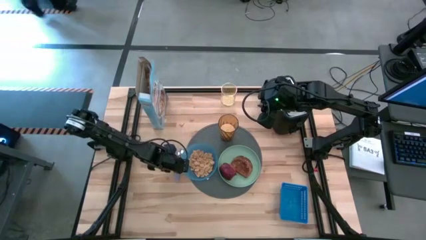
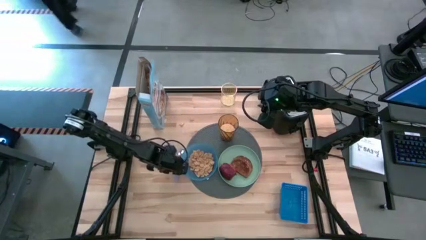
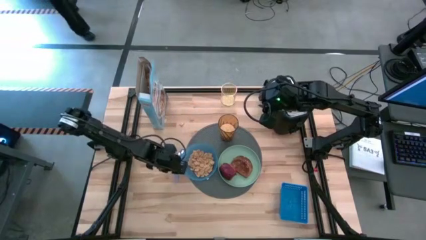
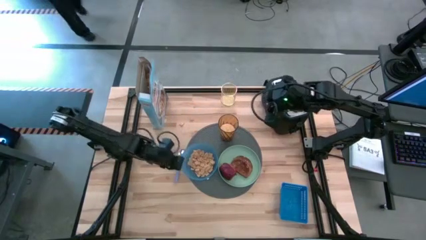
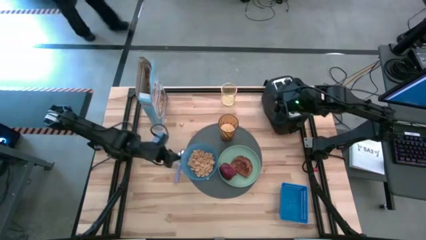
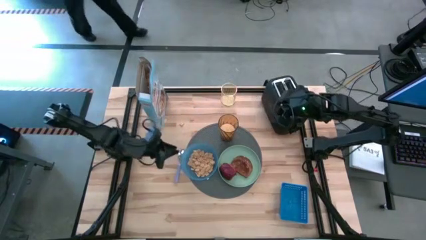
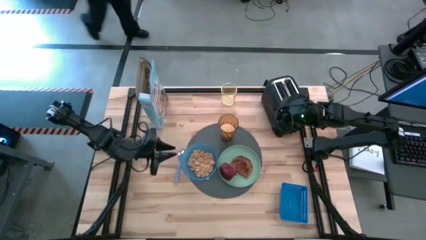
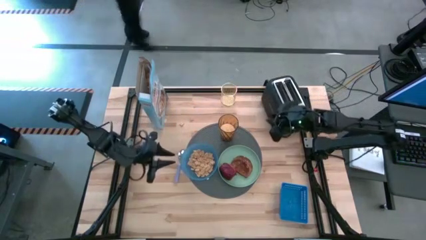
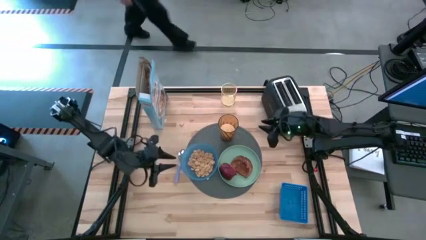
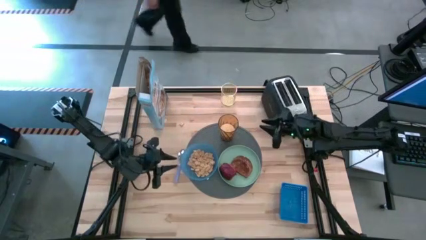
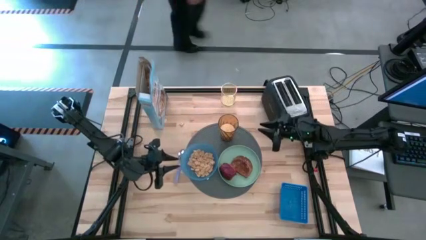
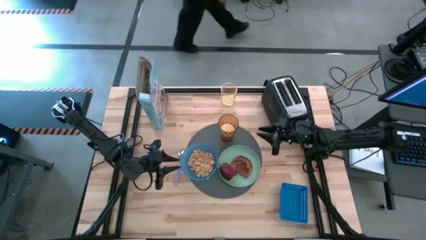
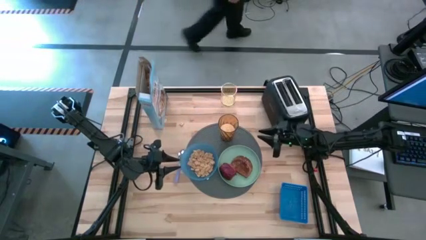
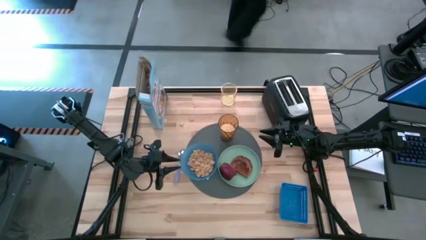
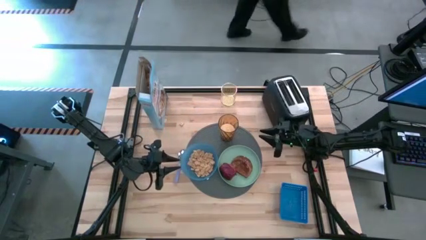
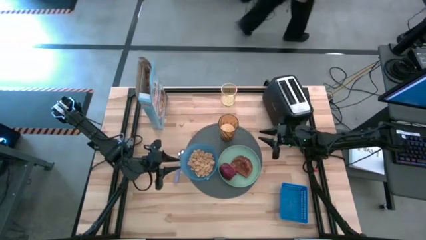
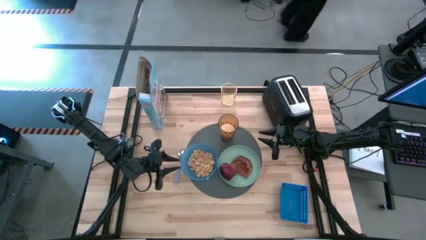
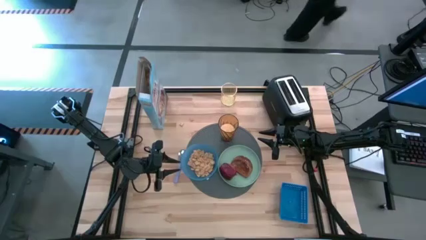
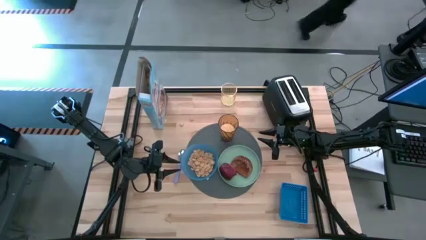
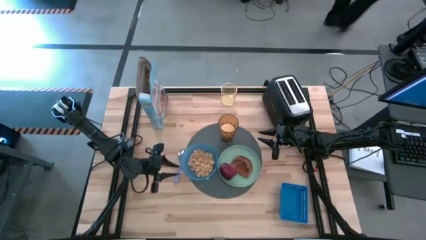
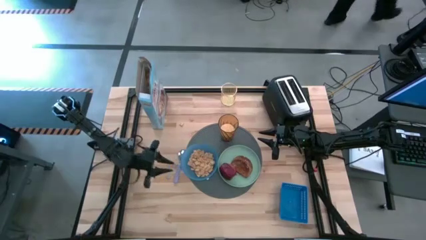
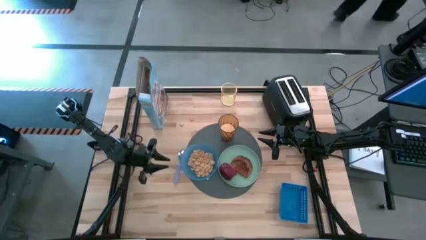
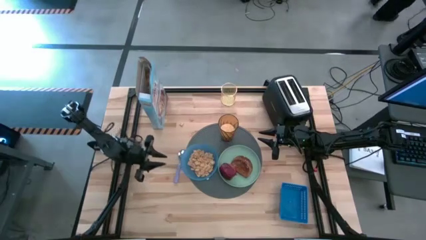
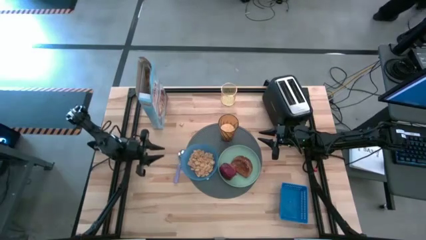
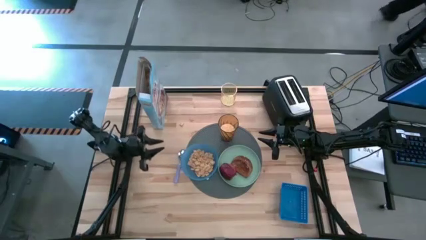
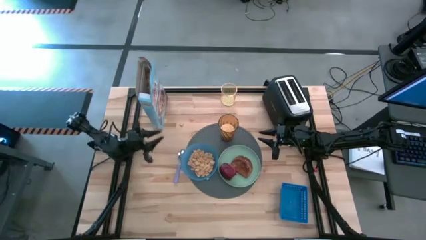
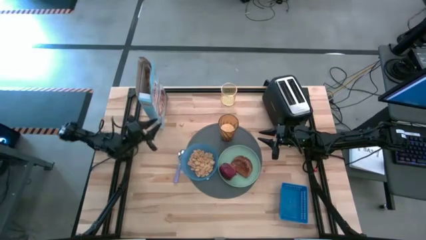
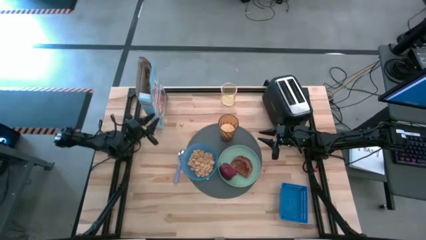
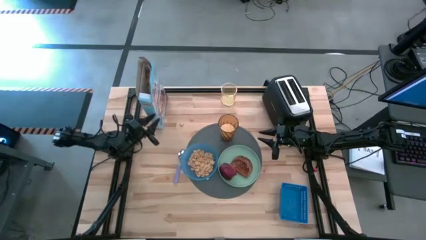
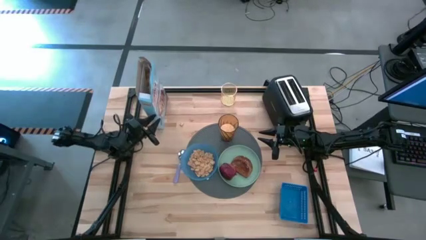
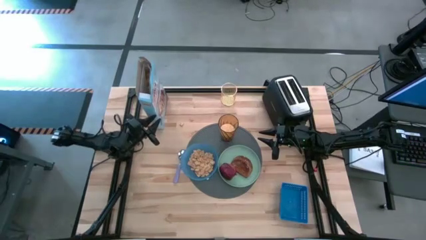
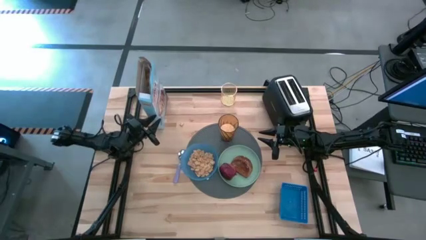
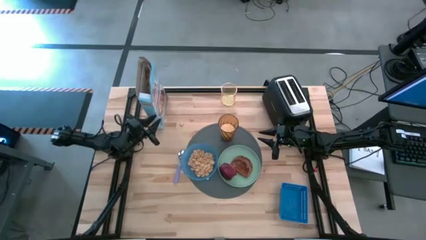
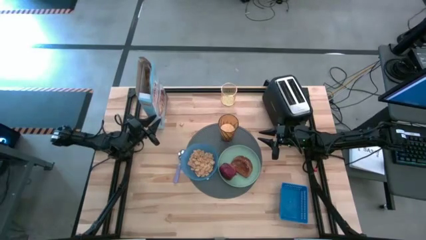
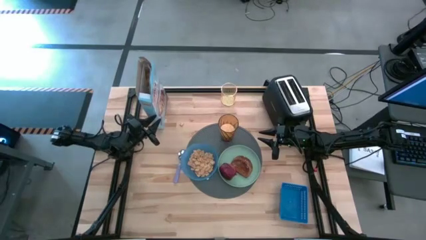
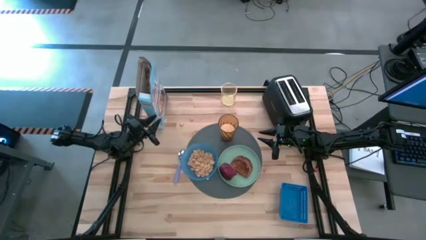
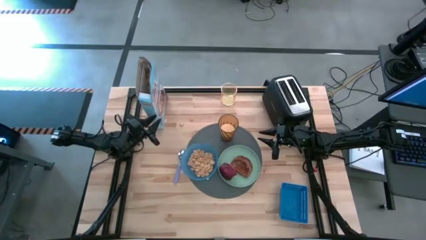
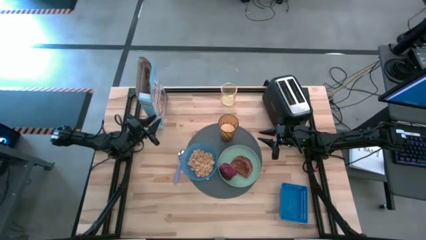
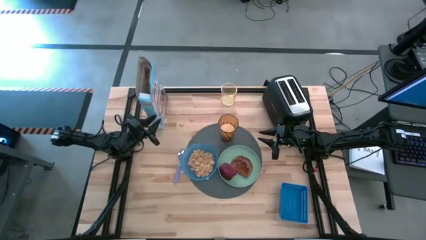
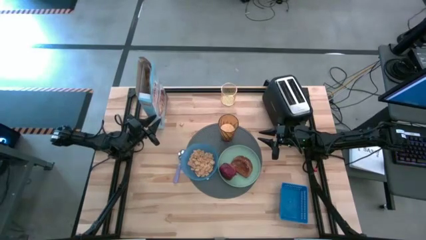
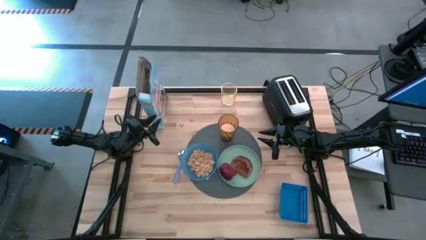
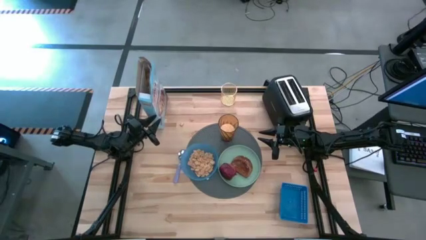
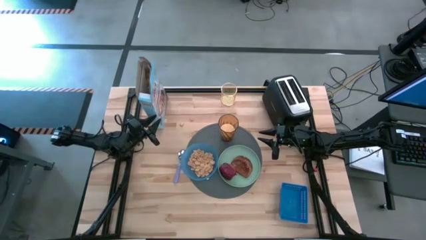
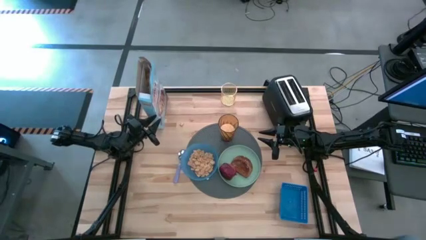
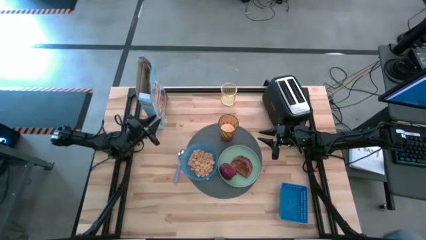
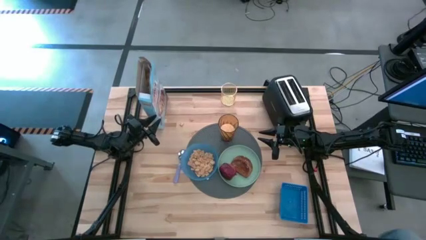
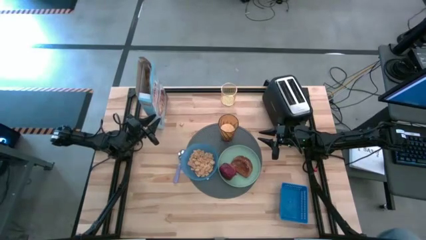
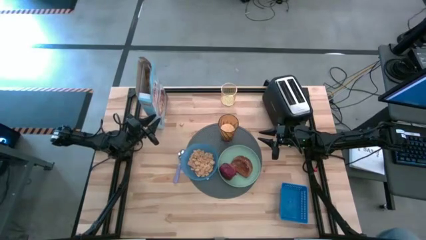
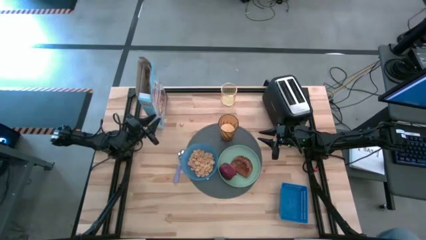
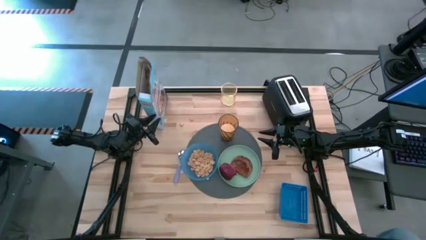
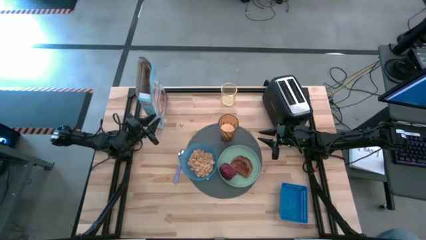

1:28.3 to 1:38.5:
Task: Arrange a breakfast setting
Return to Home Position

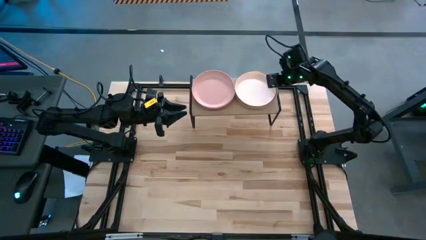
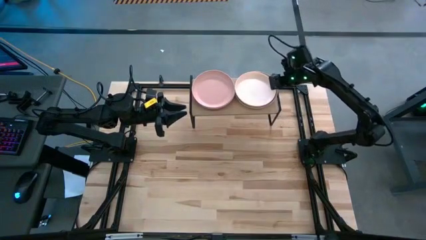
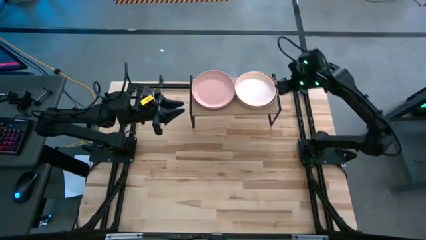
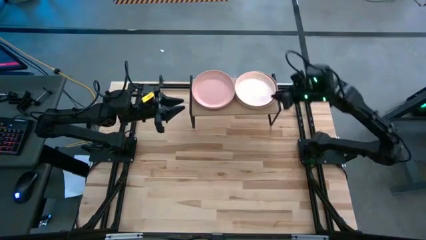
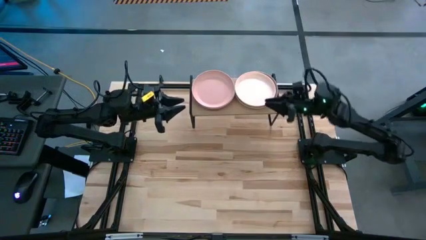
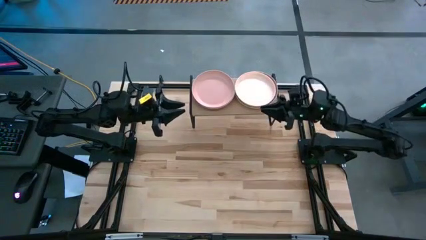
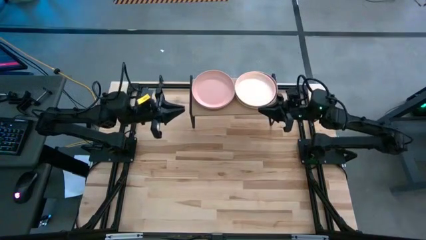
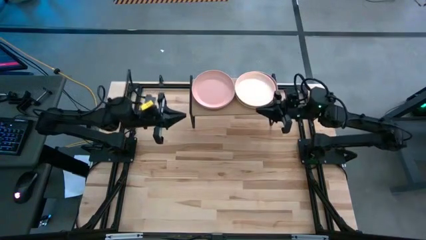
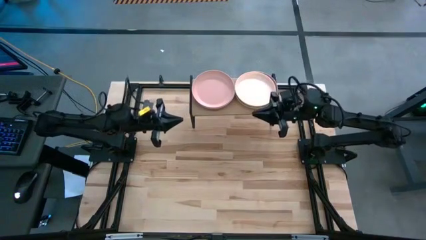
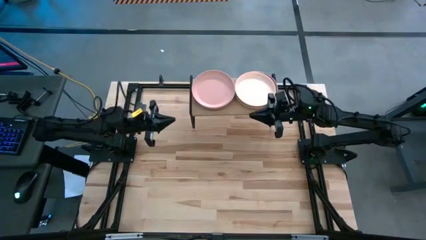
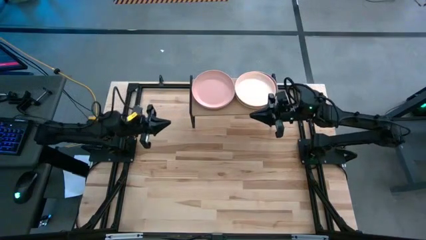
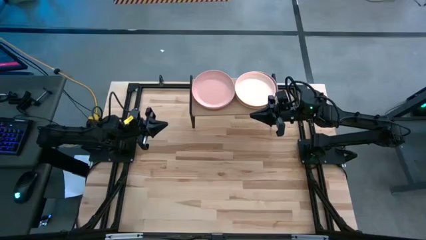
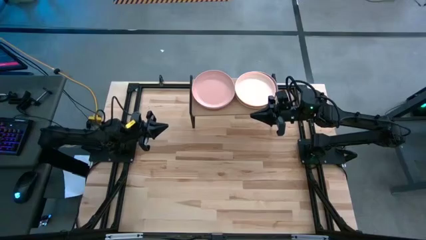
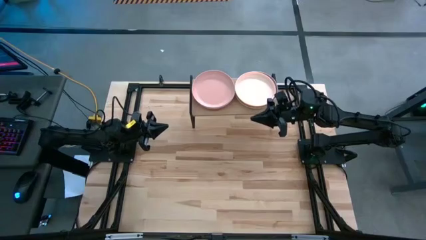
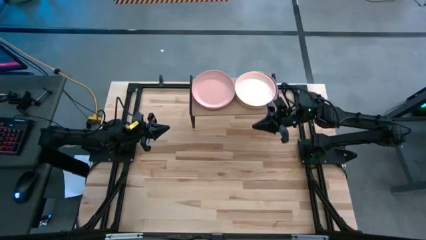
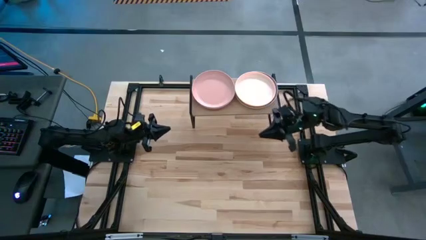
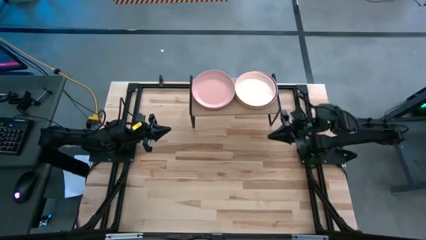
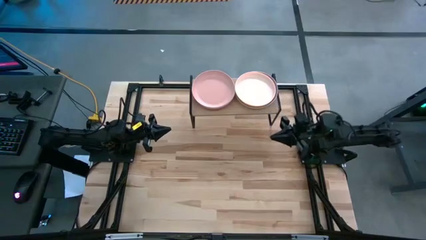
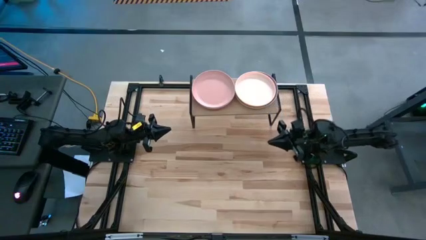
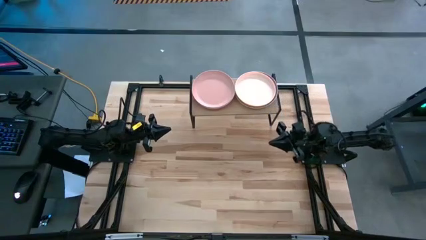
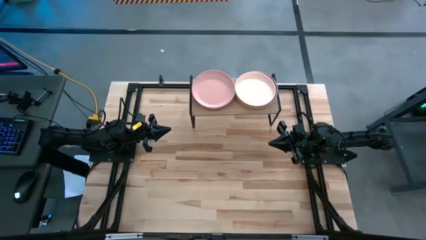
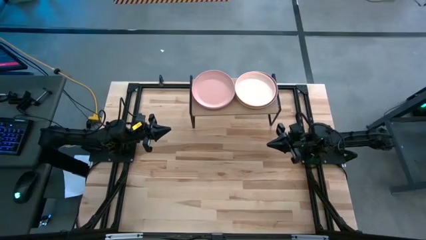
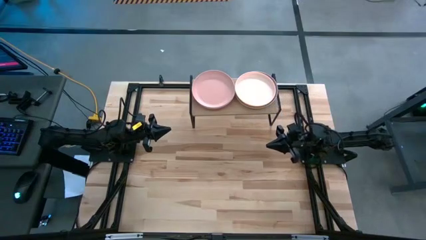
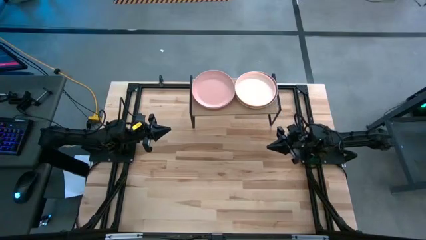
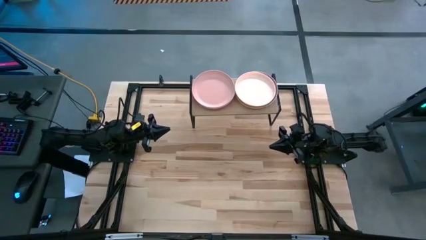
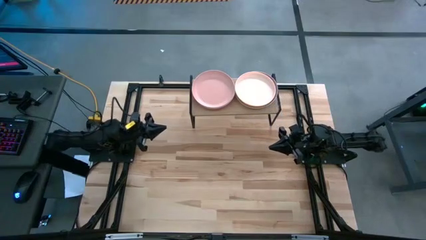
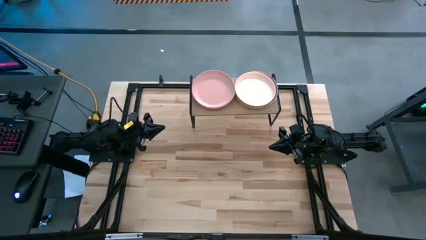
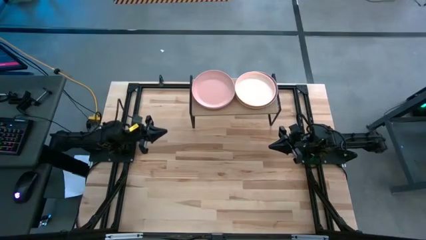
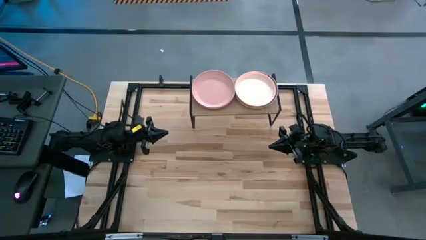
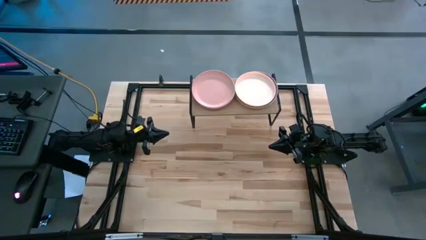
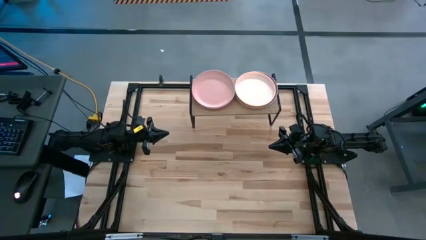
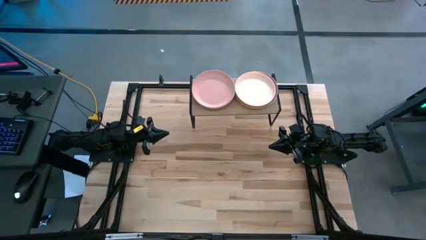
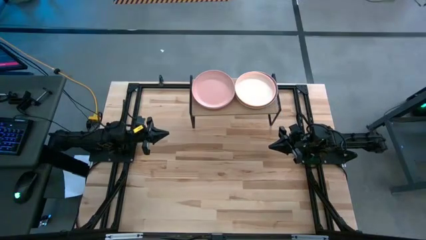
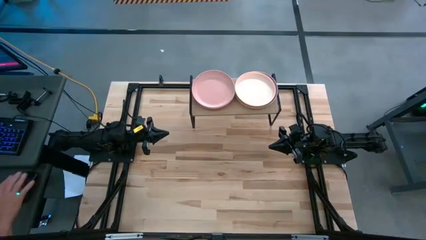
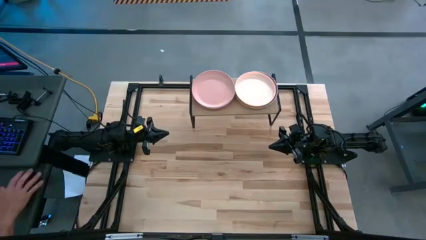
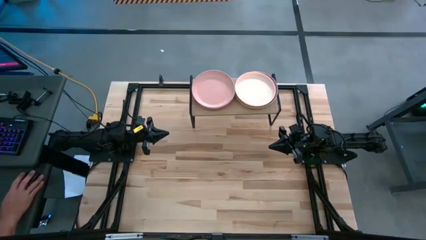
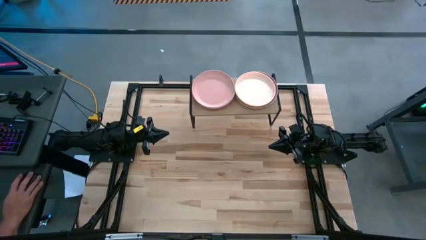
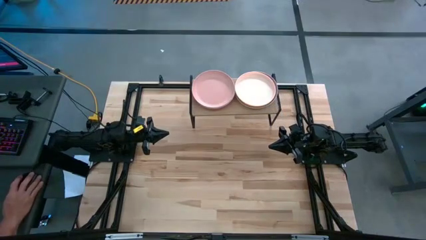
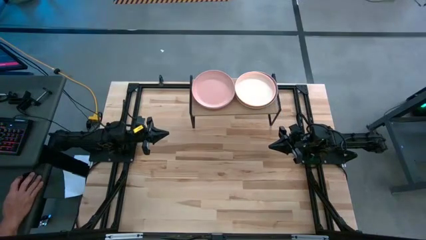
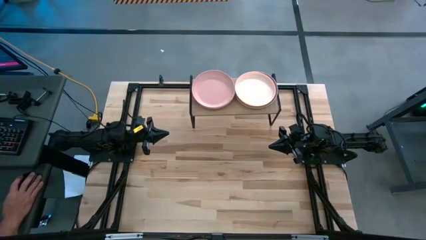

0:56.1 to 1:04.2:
Task: Place and stack plates onto a shelf
Return to Home Position
